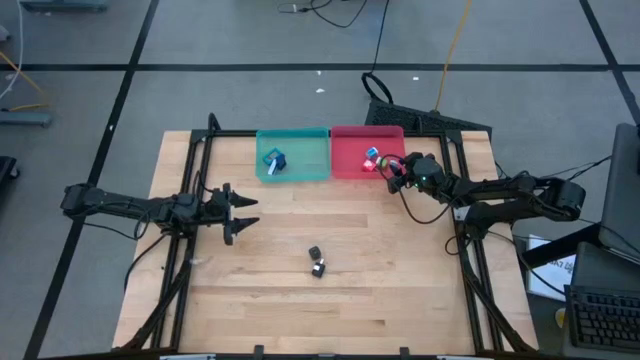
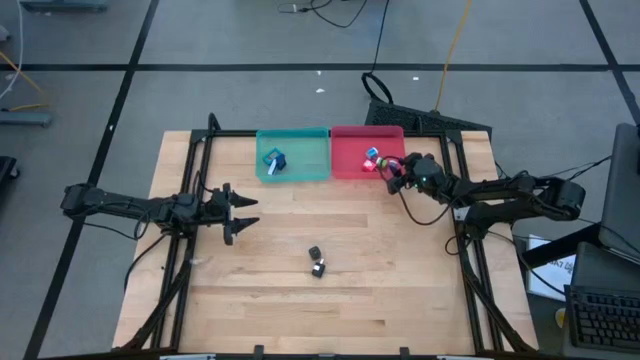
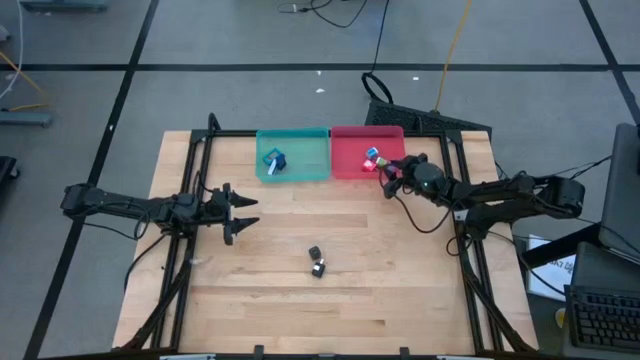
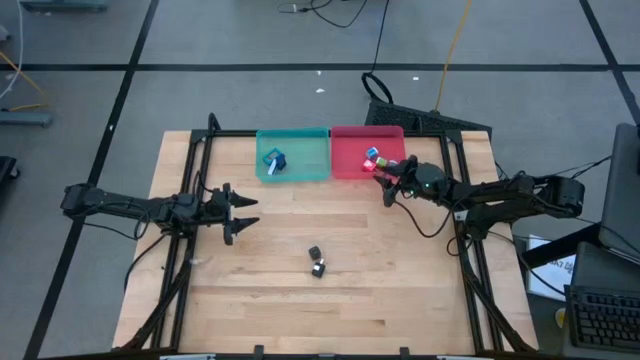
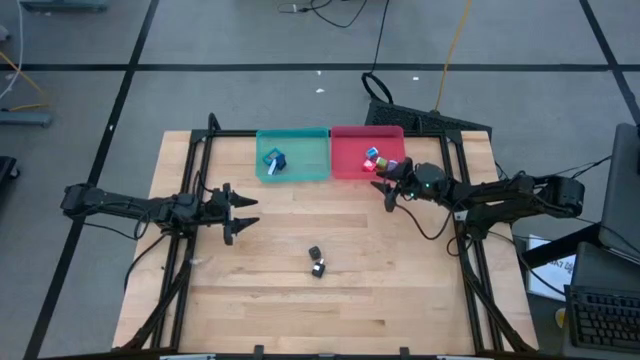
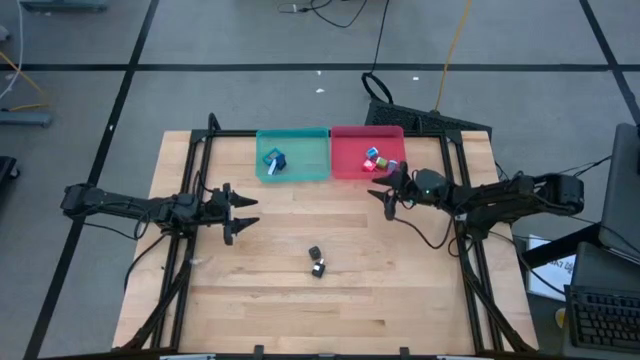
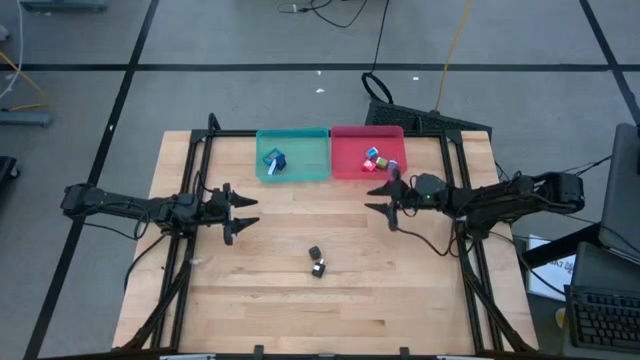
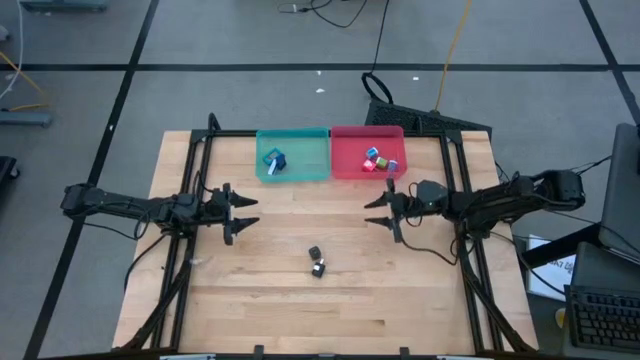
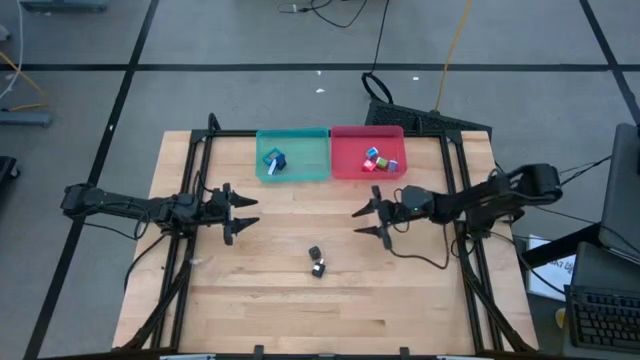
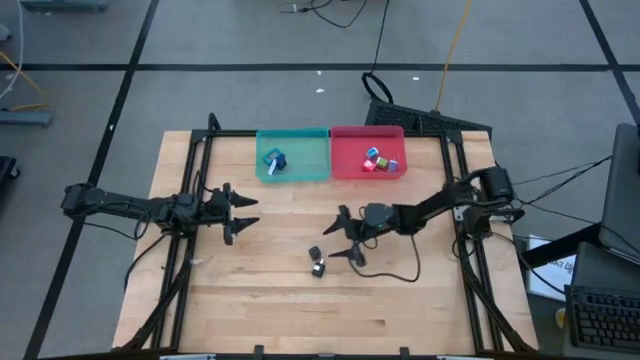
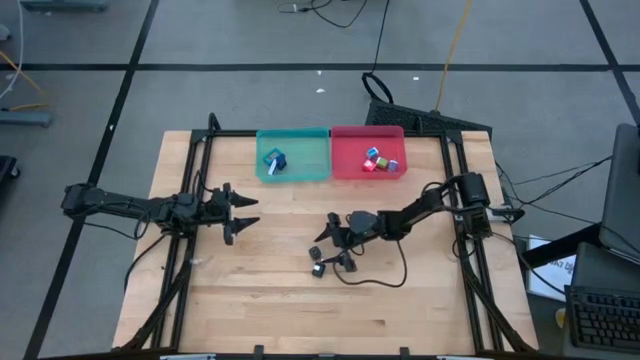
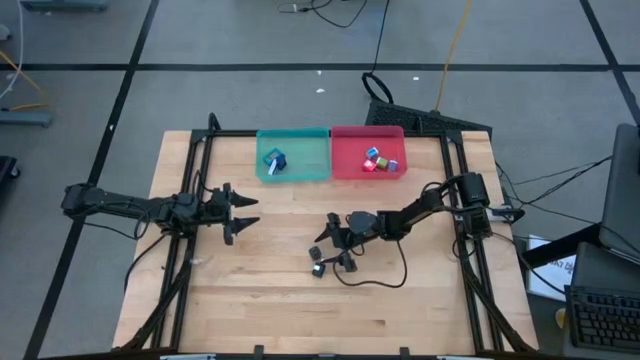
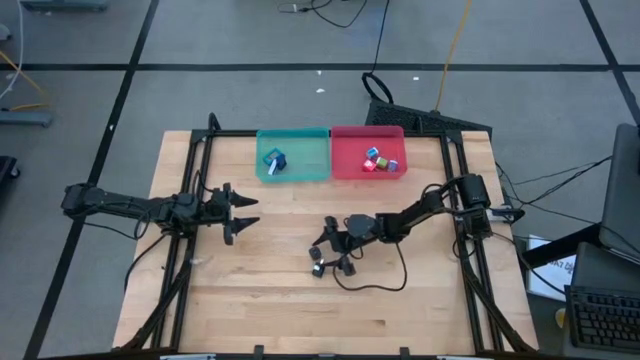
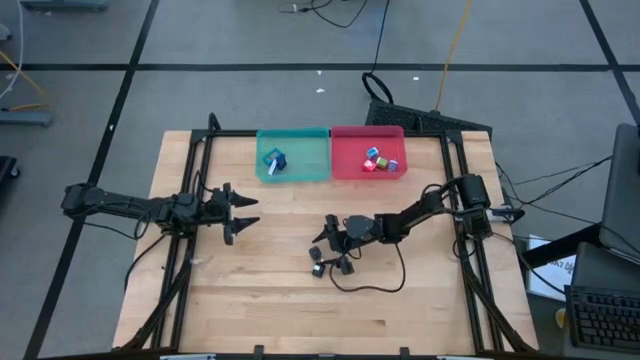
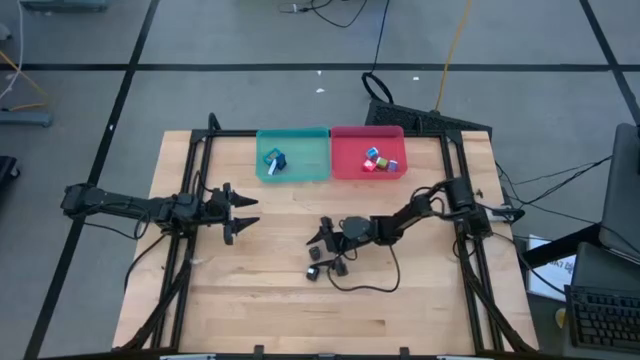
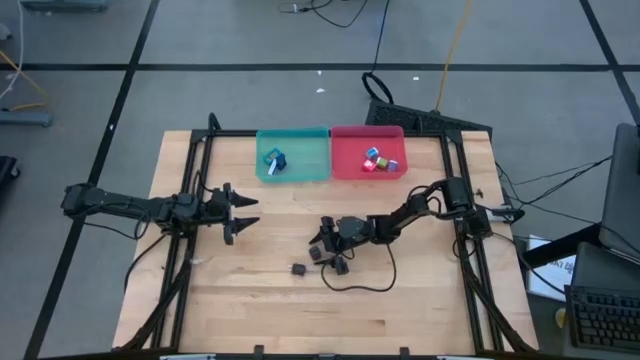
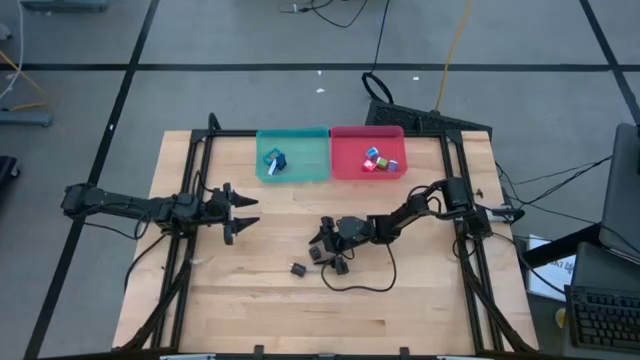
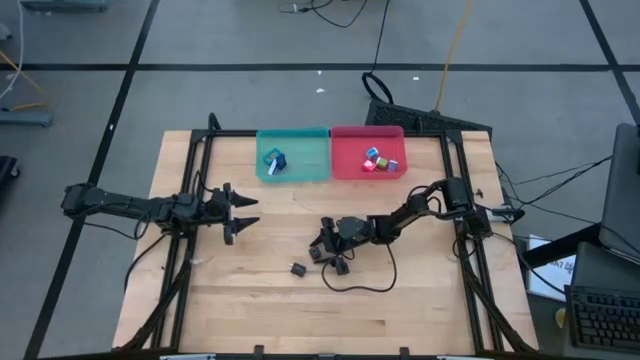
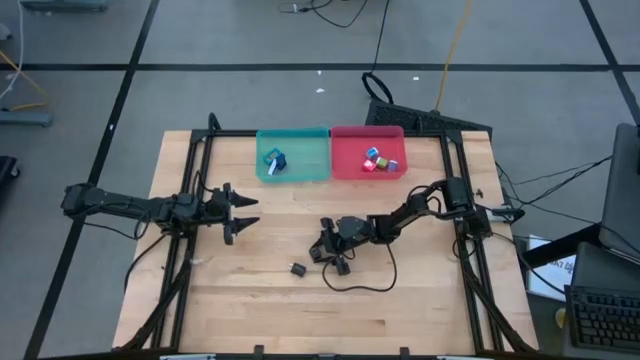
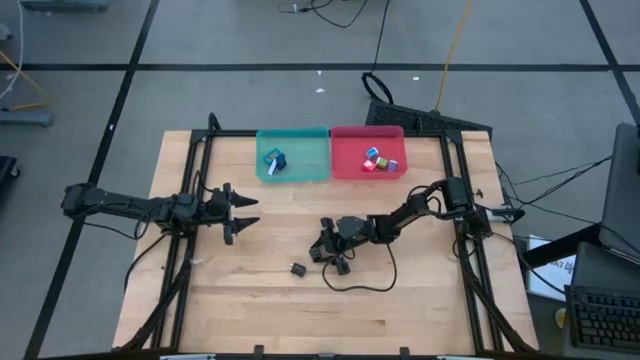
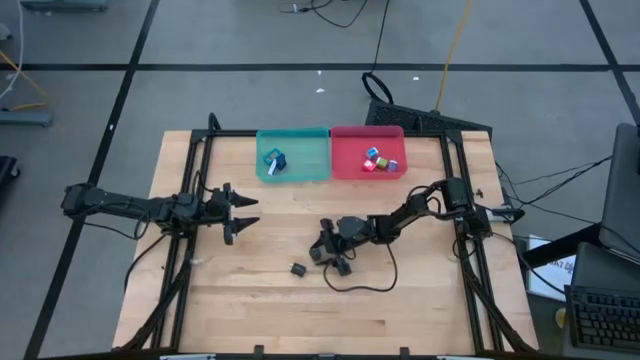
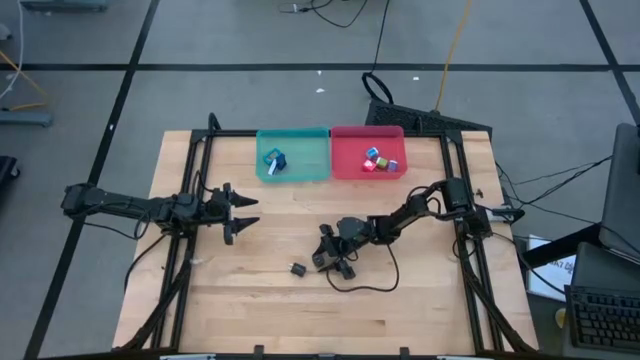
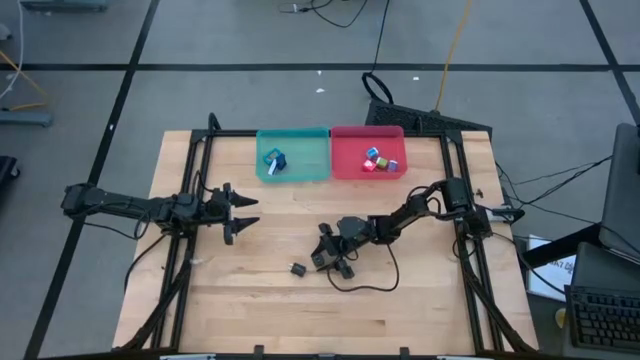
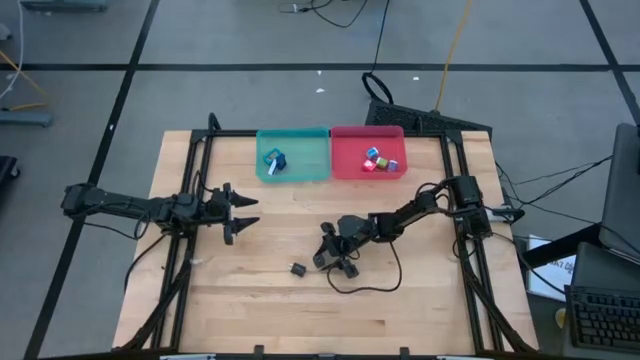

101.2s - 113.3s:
Task: Sort charging adapters and watches
Put the top black charging adapter in the red bin

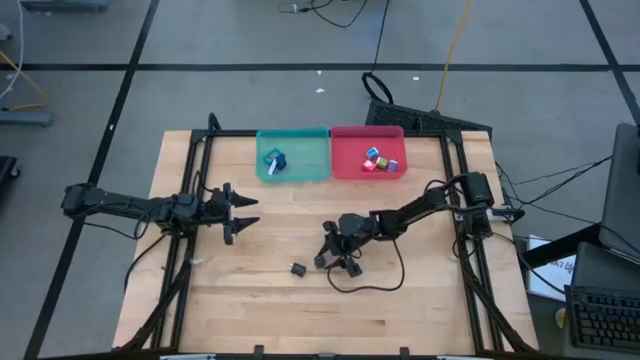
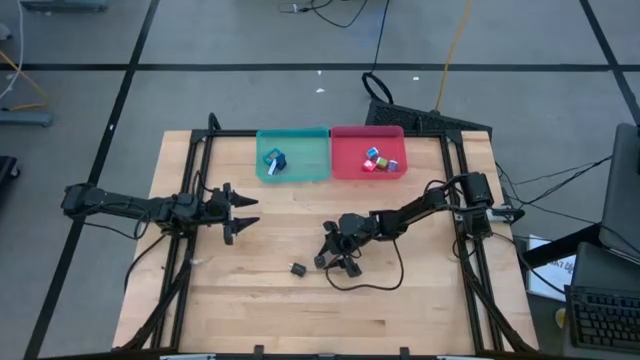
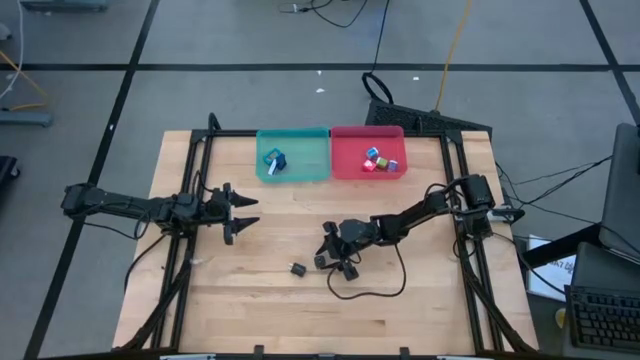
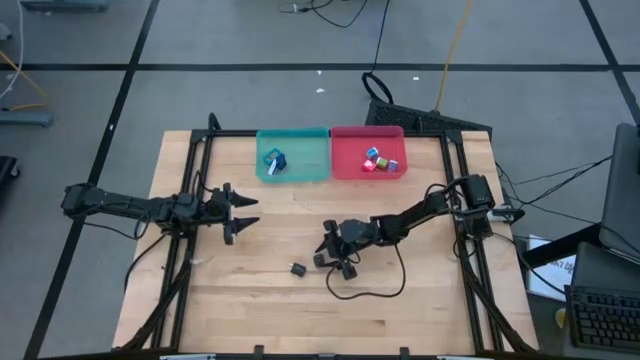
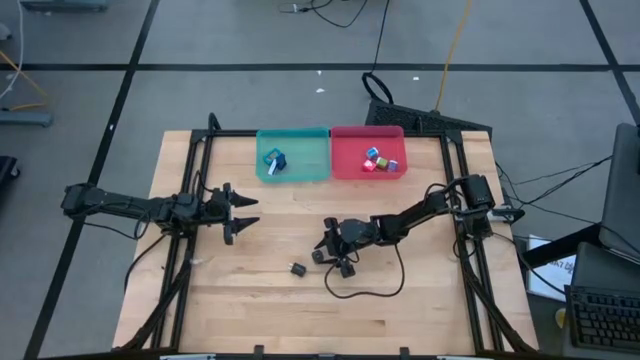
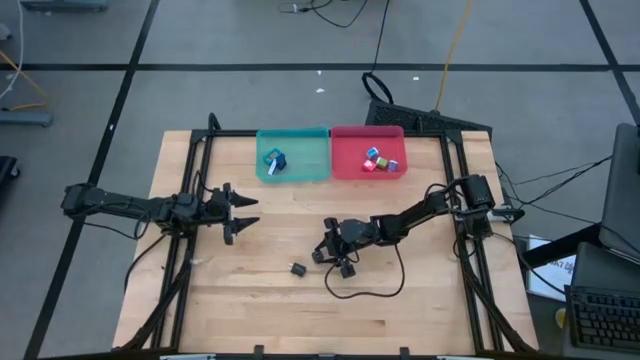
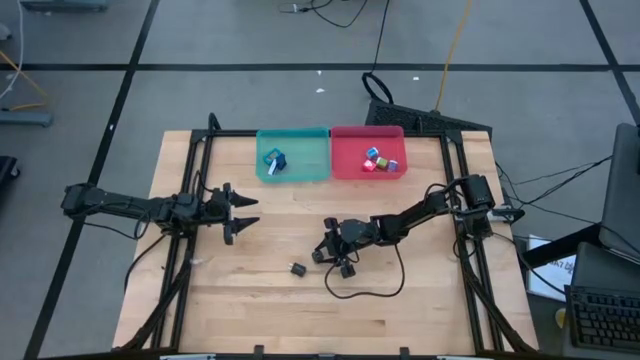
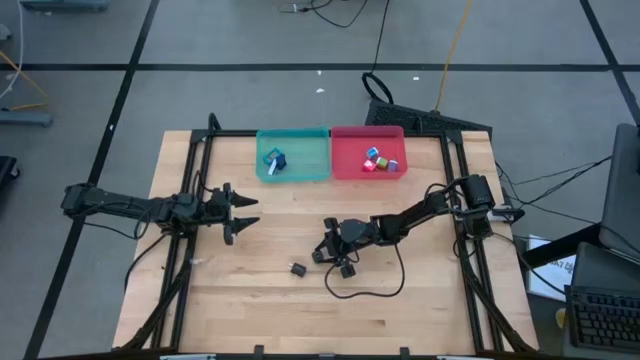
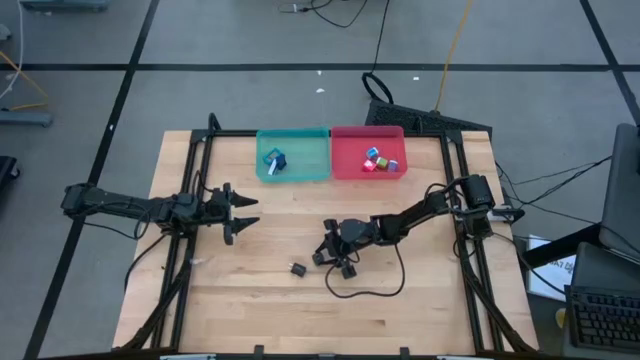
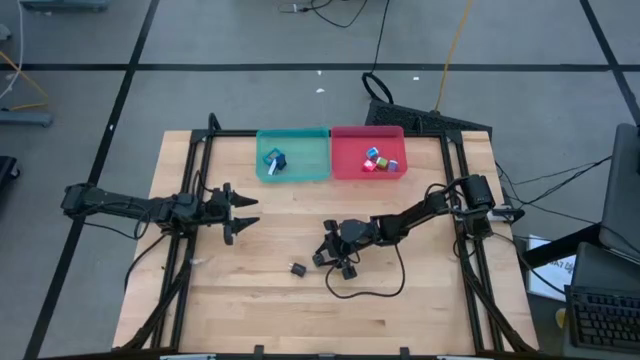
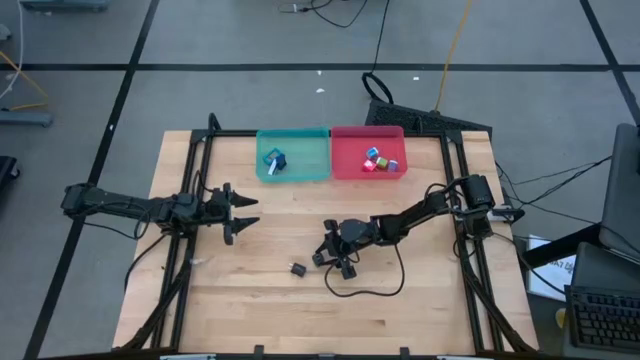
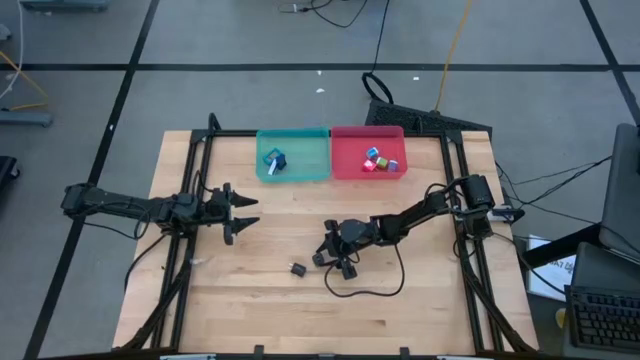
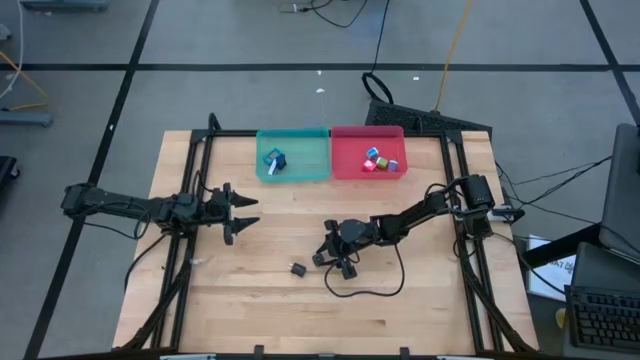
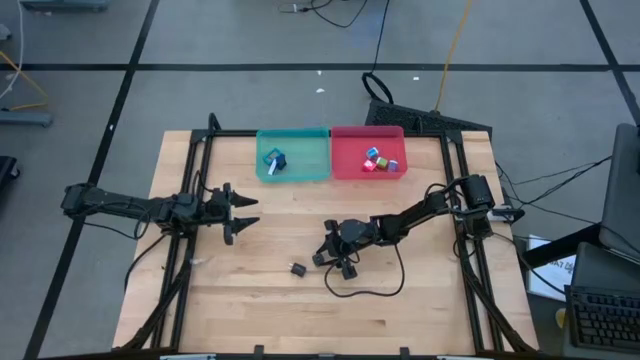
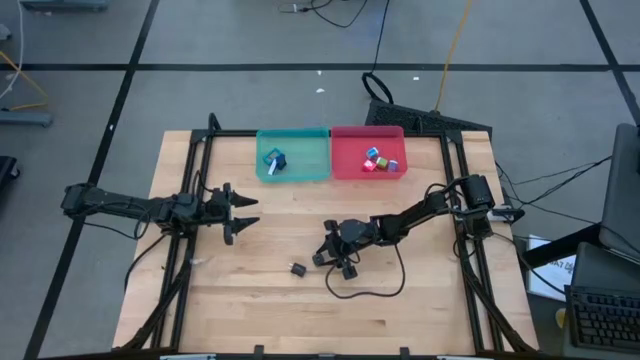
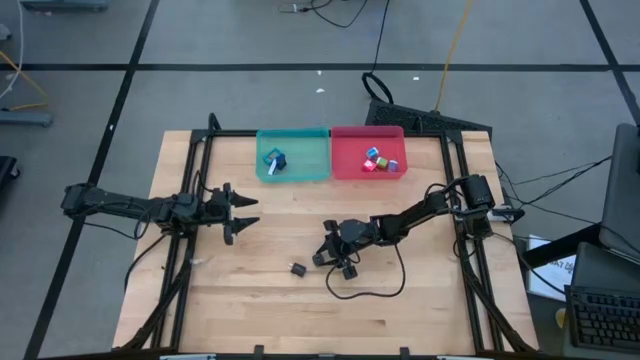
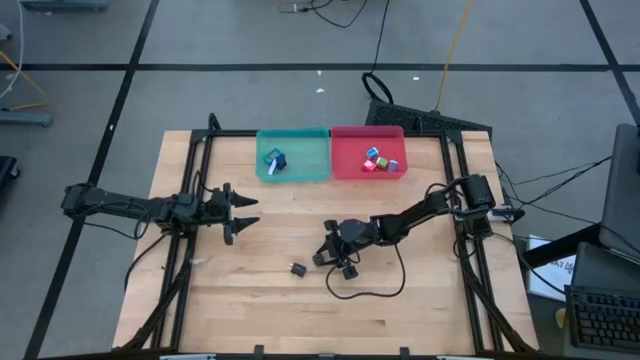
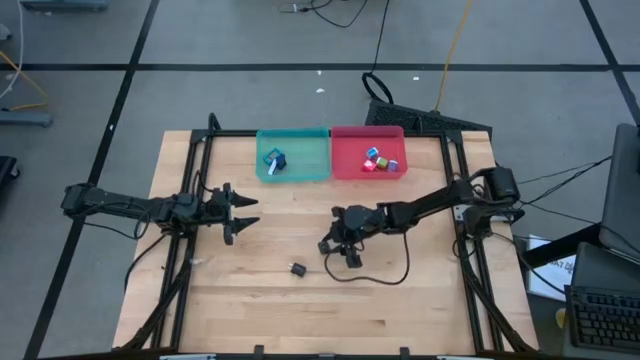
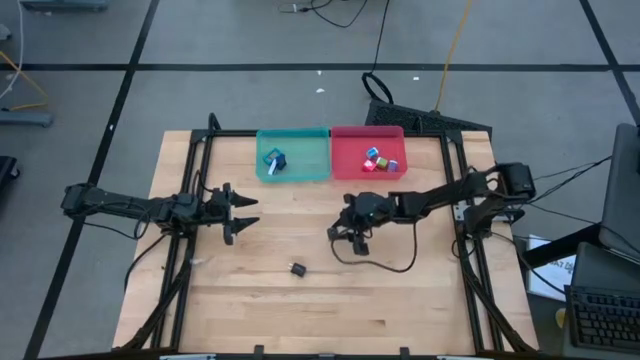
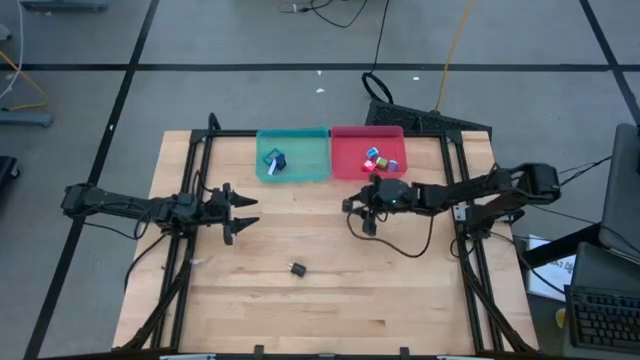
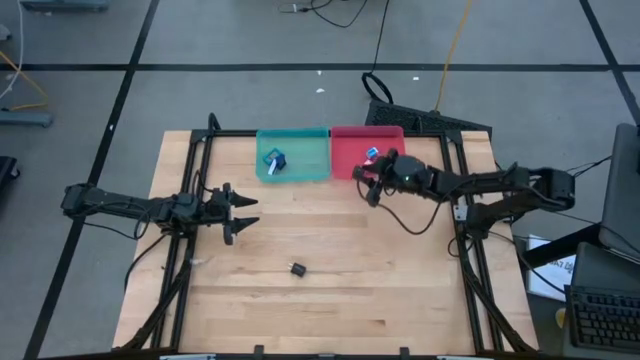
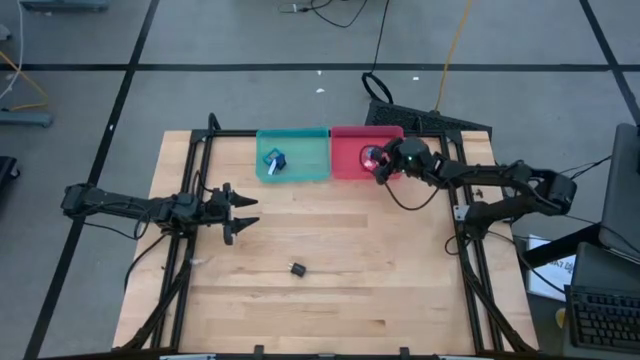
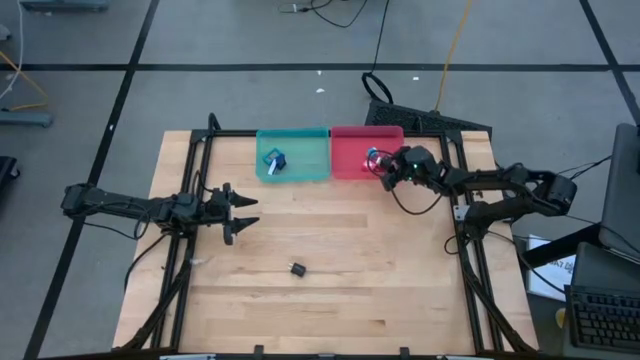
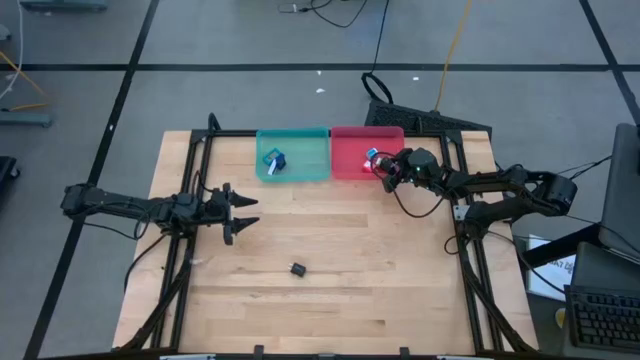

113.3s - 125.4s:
Put the top black charging adapter in the red bin
